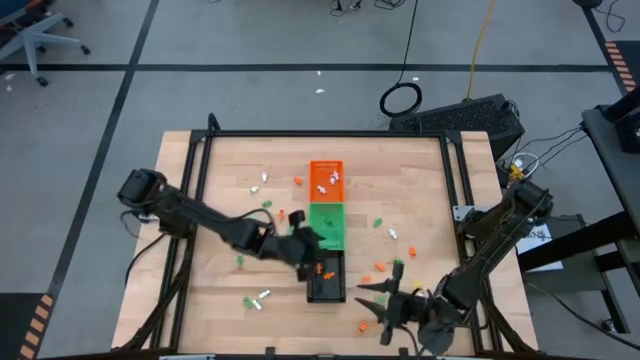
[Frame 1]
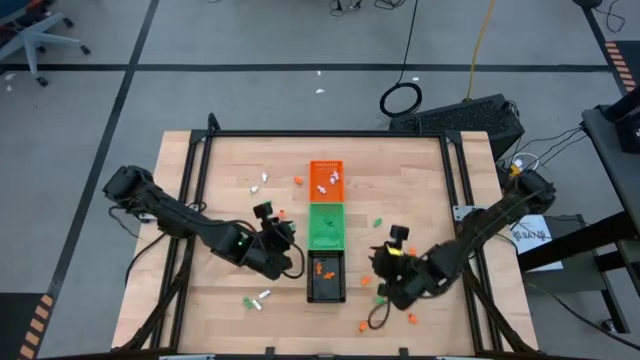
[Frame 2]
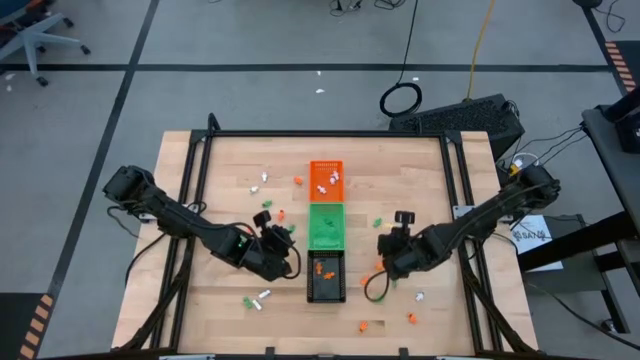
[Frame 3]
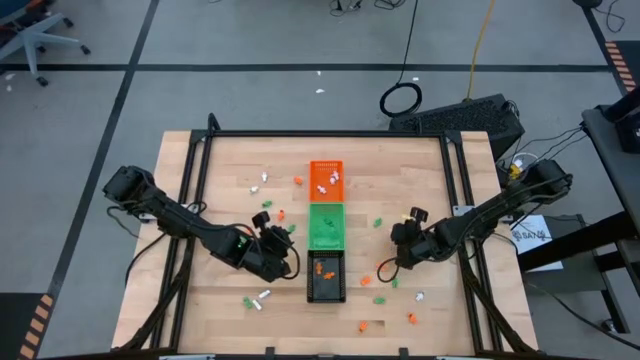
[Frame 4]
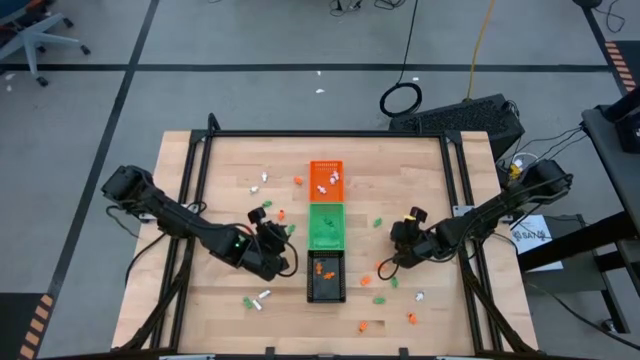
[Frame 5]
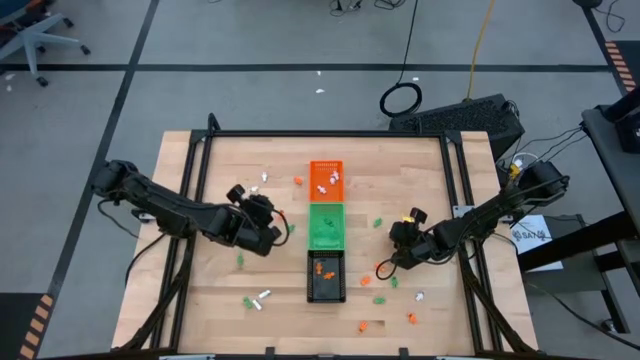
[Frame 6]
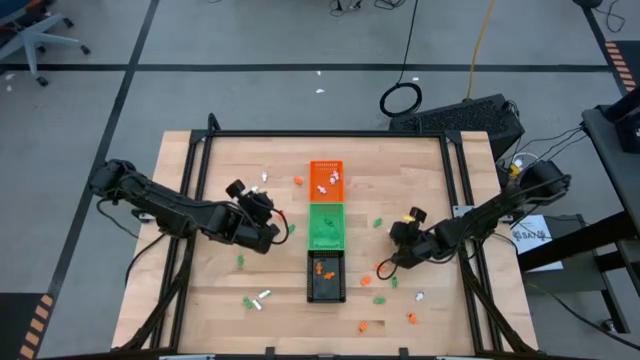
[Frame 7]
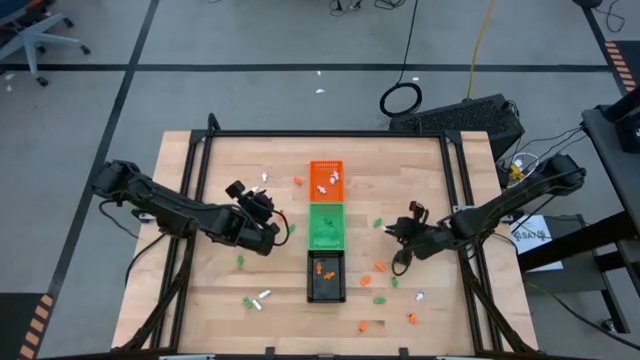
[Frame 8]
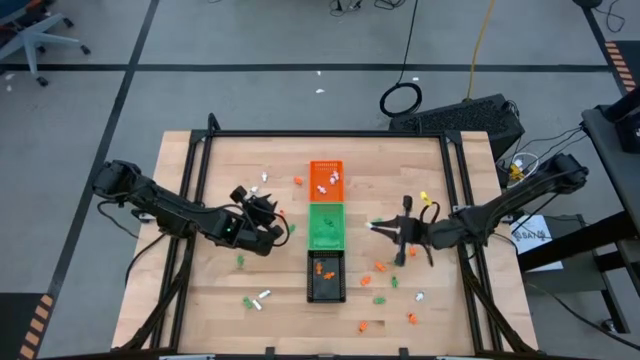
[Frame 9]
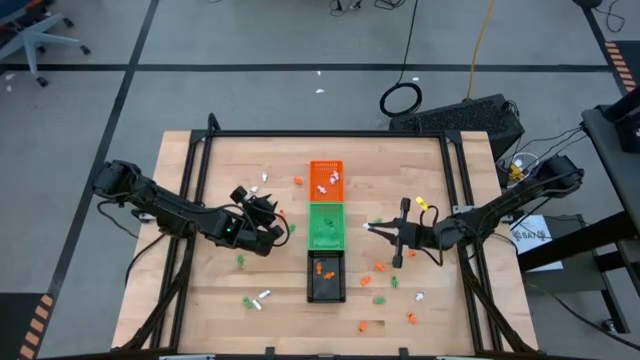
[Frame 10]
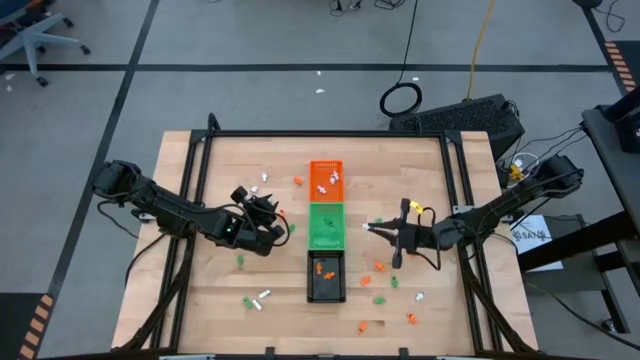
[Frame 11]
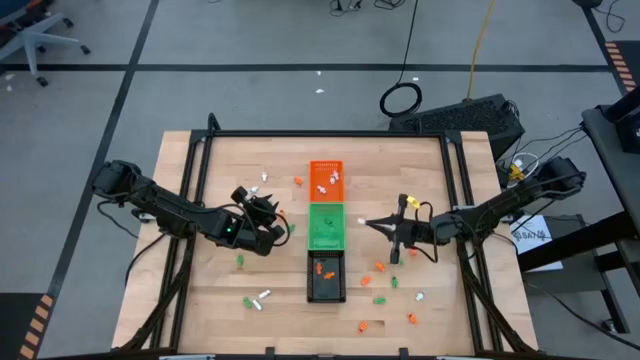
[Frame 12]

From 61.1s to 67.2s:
Task: Sort Halloween decoration
Put the white skeleton toy into the orange bin

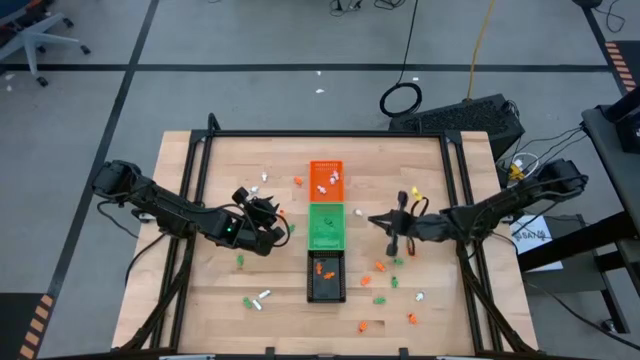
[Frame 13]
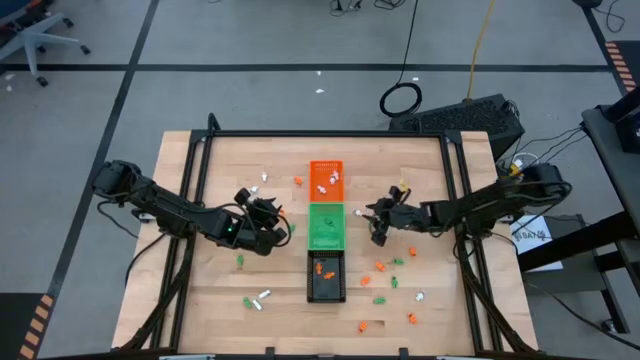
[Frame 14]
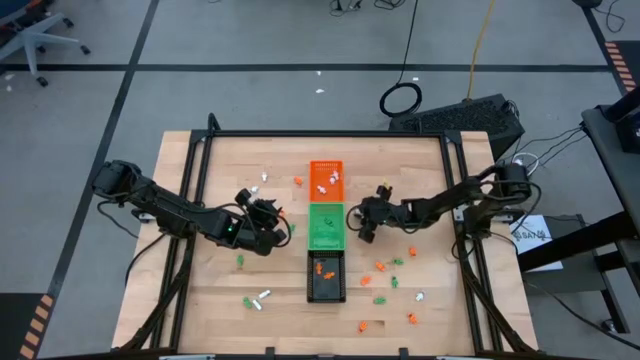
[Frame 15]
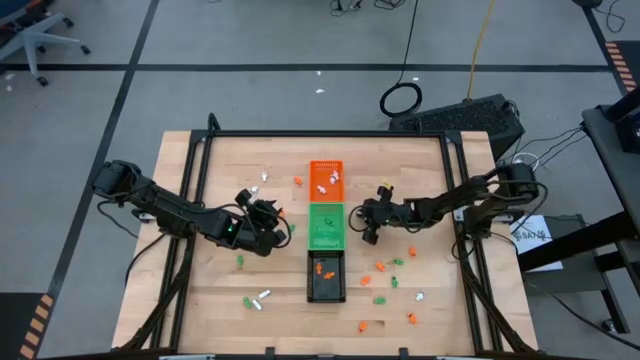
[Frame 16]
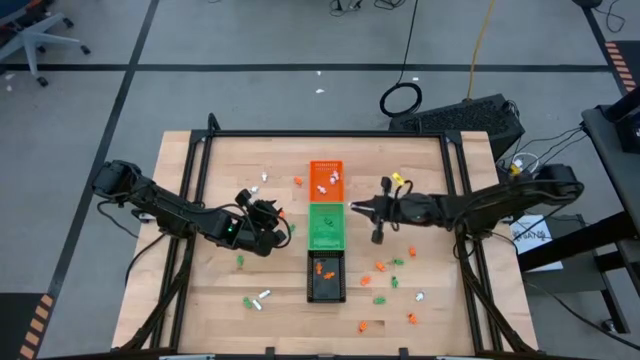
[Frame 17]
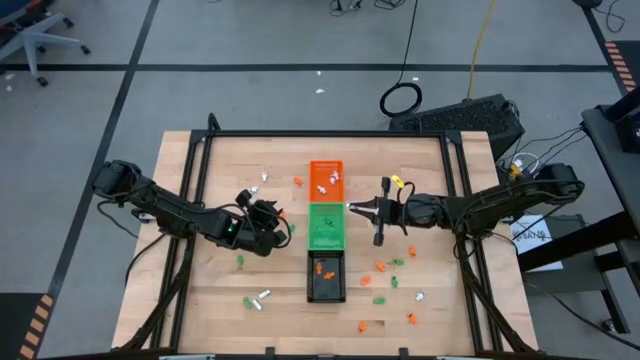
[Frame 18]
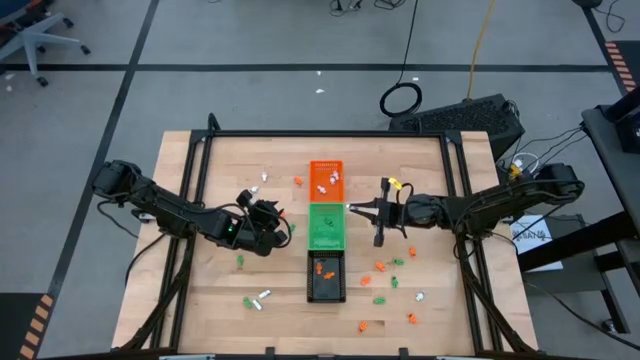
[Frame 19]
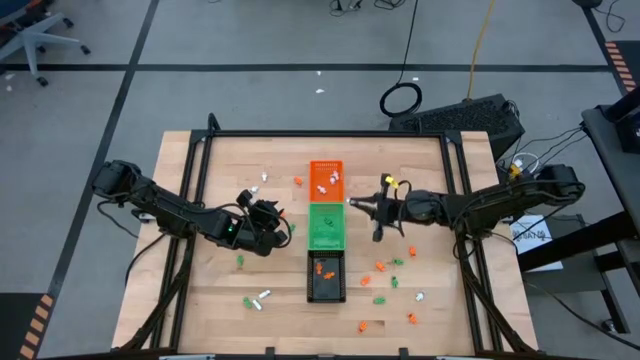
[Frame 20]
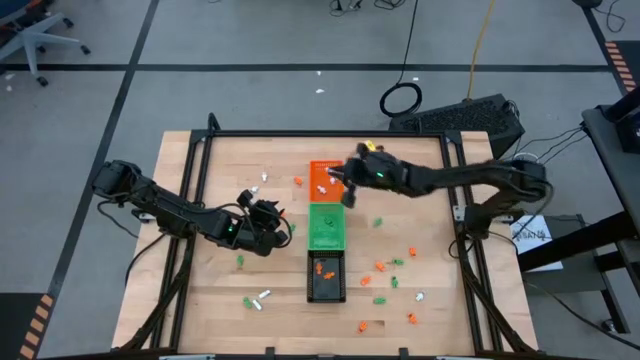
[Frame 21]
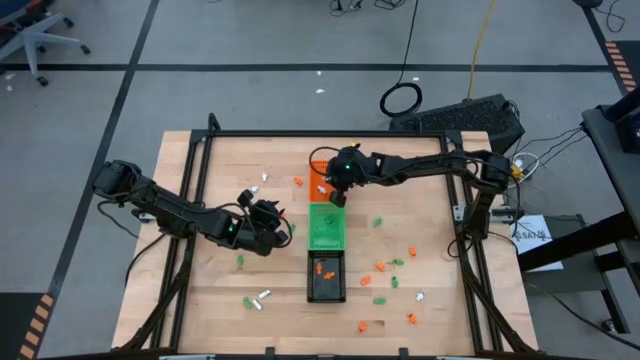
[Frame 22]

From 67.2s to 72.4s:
Put the white skeleton toy into the orange bin

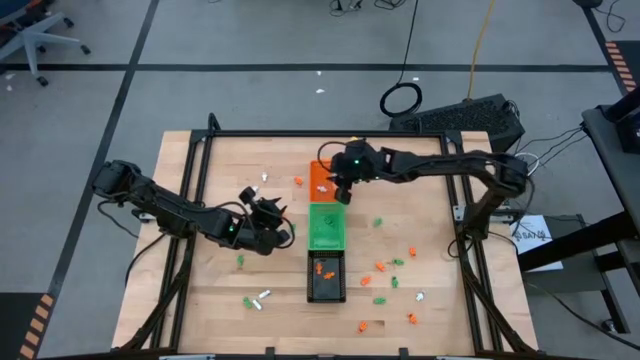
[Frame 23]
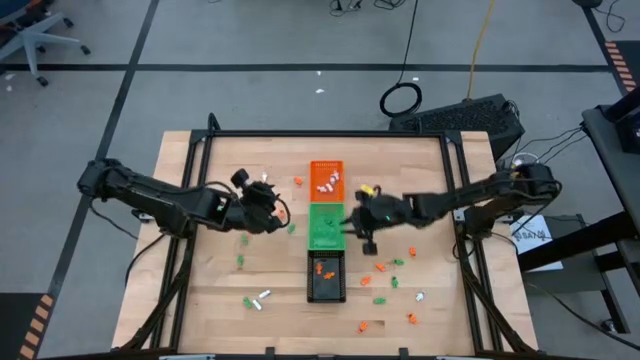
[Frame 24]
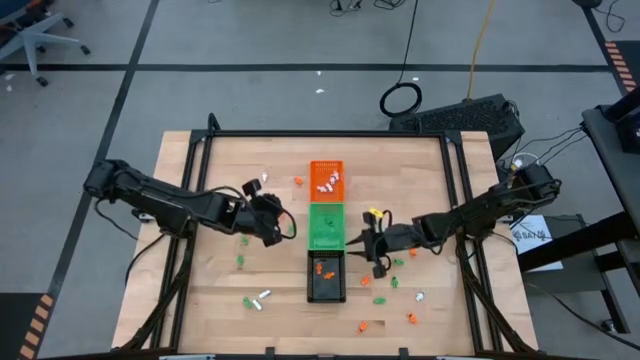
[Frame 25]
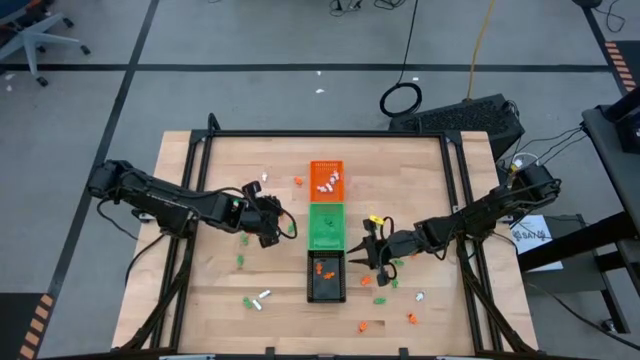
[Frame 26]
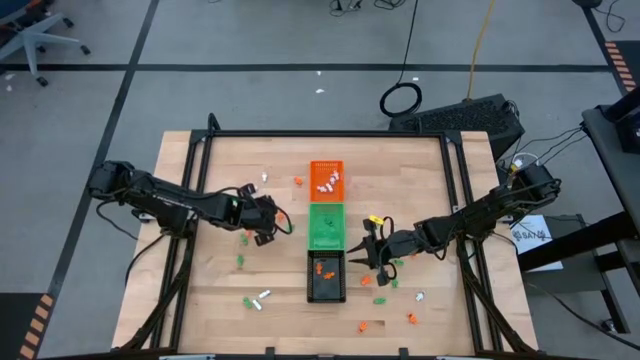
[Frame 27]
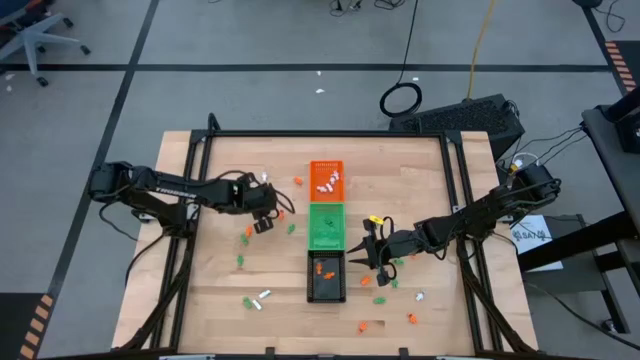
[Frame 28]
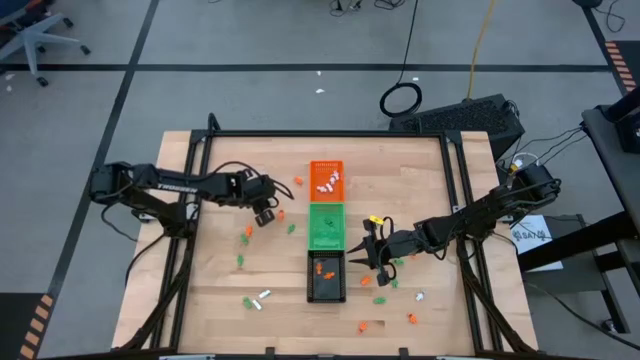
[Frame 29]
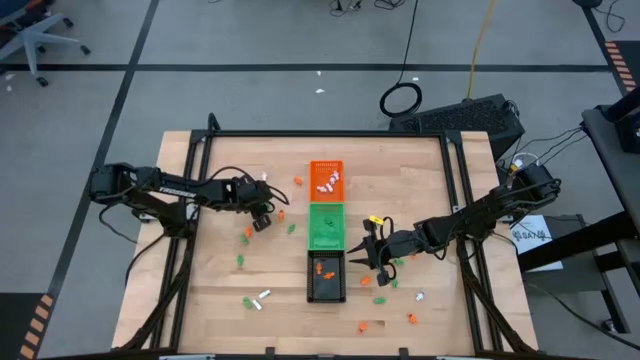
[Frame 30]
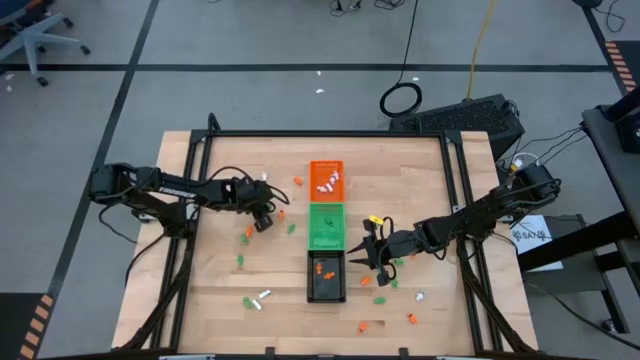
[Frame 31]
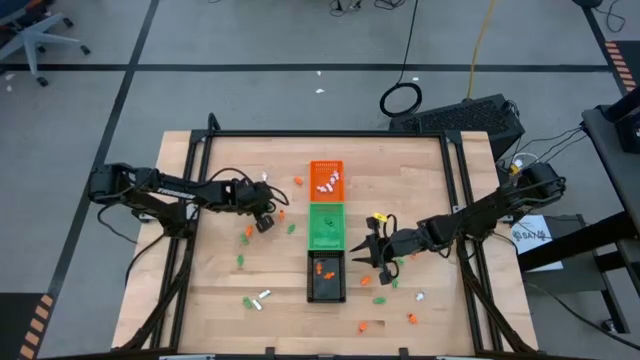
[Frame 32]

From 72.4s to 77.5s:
Put the green skeleton toy into the green bin

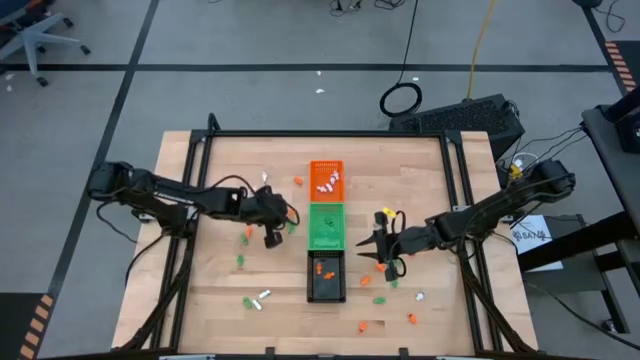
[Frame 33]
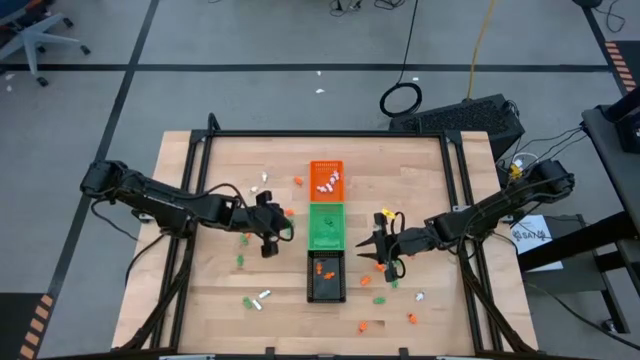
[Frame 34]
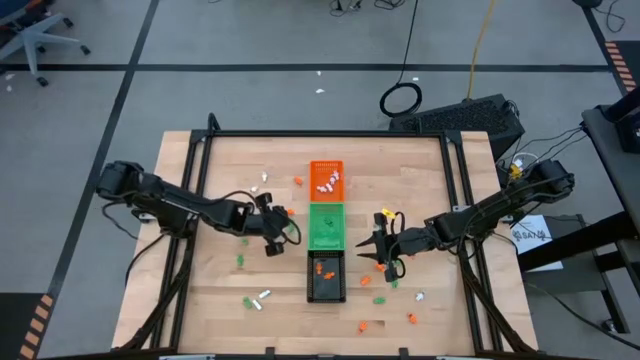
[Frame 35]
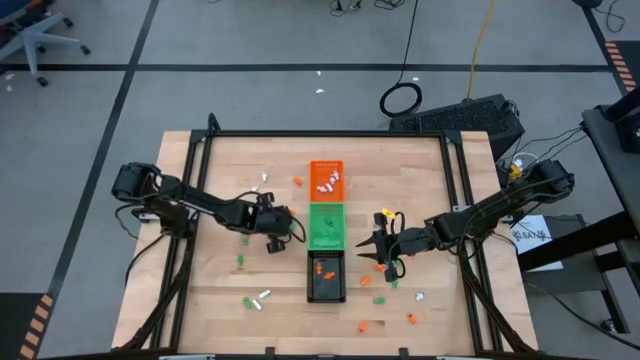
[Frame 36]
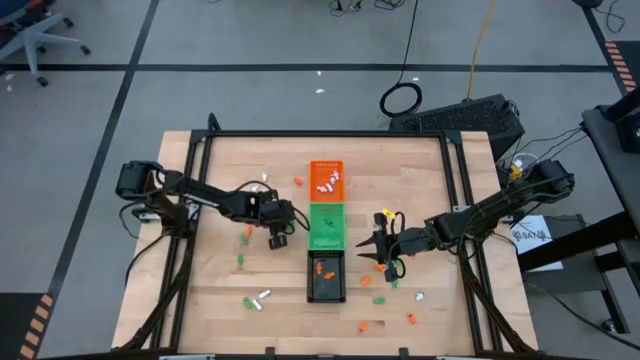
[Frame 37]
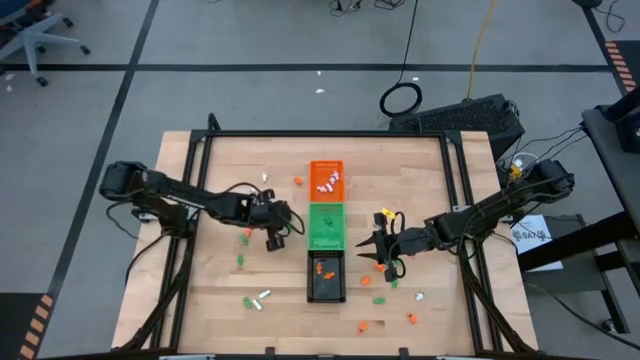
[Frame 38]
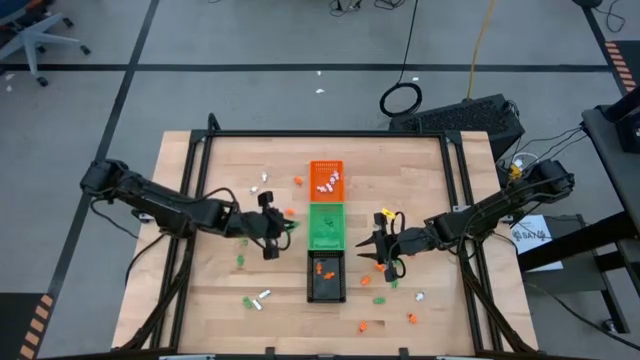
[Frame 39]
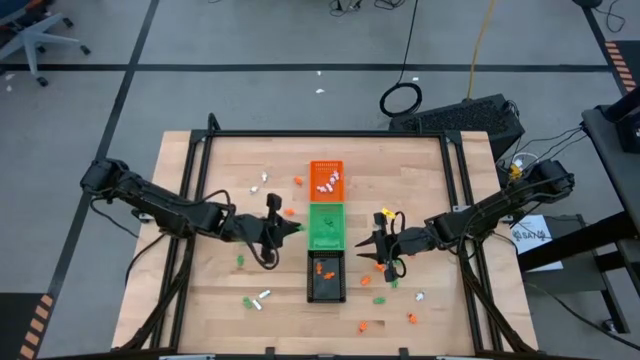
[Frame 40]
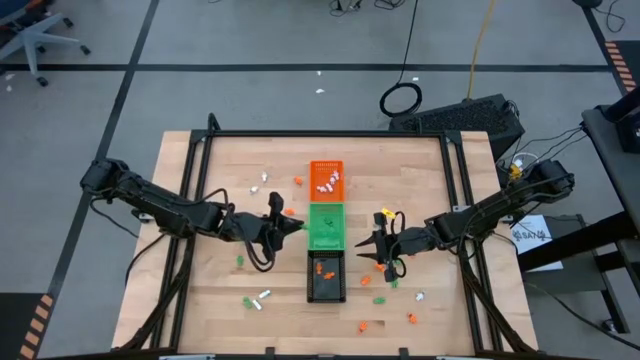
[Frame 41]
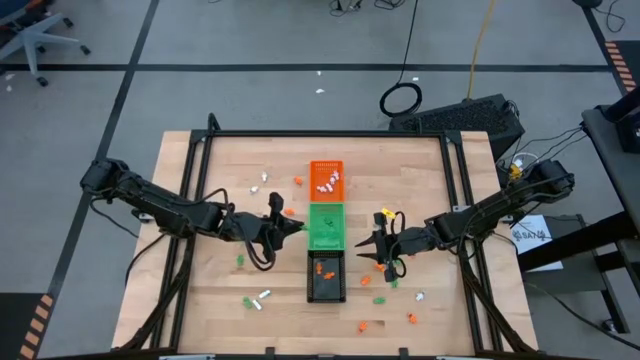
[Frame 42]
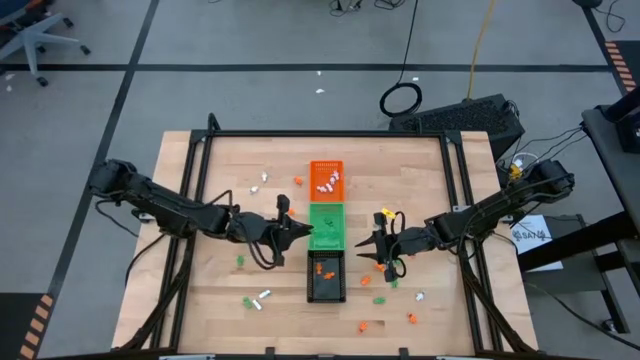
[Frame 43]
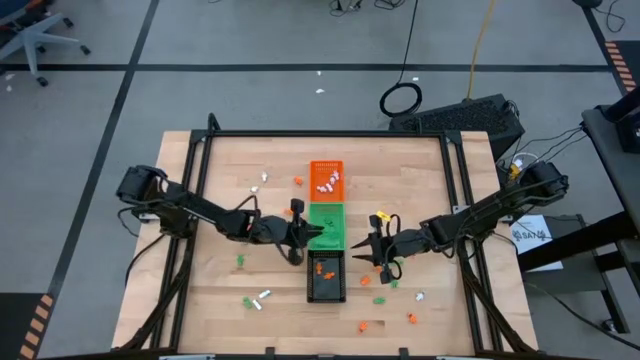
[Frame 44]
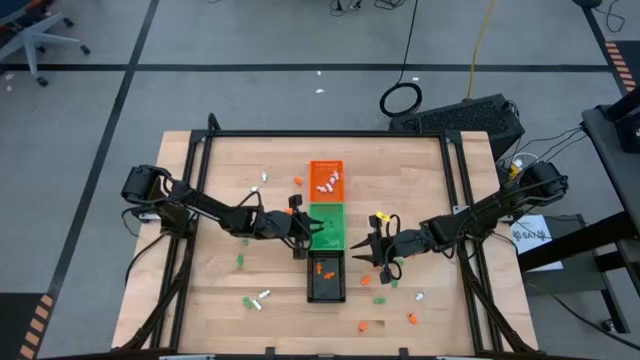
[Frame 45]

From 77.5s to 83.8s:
Put the green skeleton toy into the green bin
